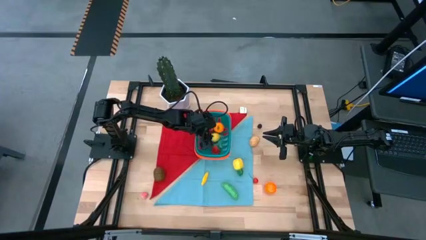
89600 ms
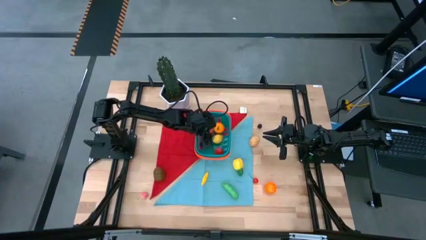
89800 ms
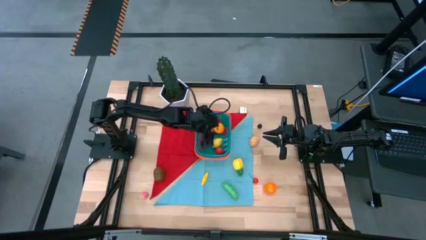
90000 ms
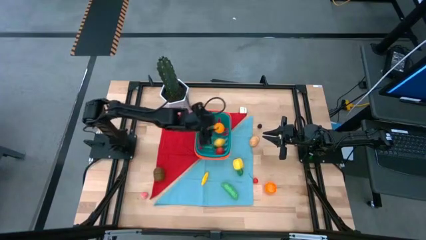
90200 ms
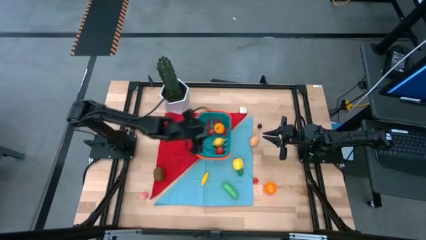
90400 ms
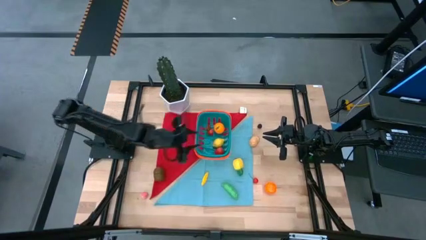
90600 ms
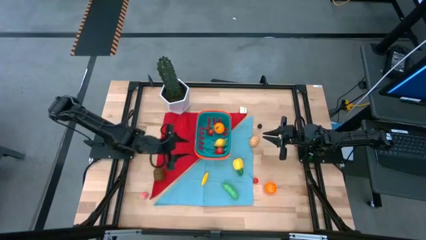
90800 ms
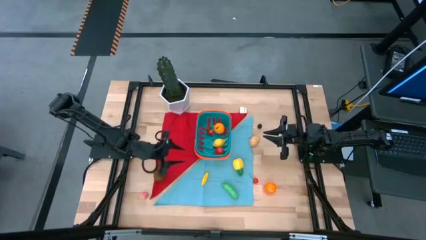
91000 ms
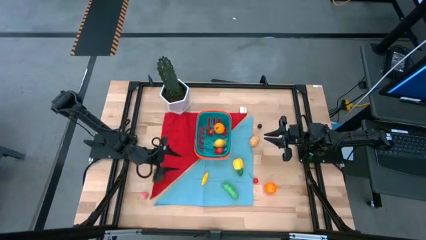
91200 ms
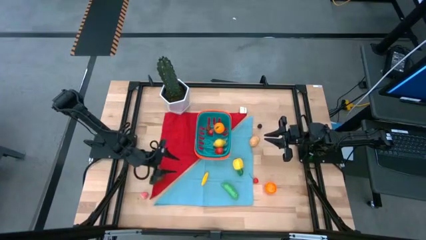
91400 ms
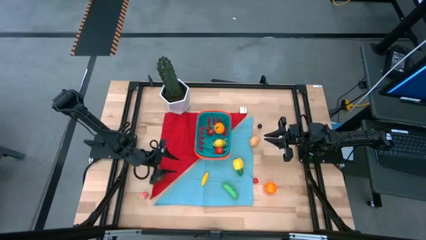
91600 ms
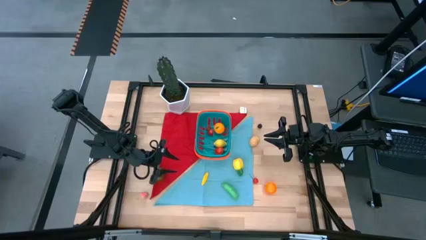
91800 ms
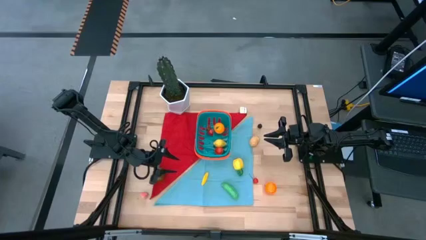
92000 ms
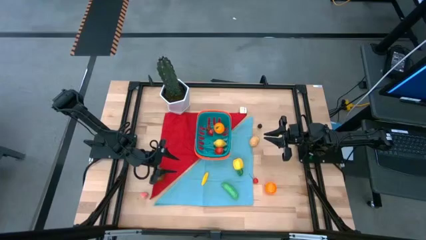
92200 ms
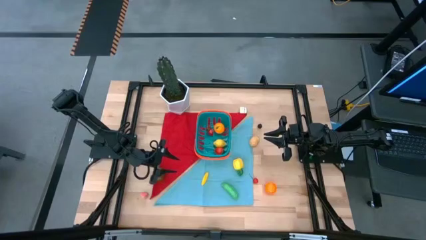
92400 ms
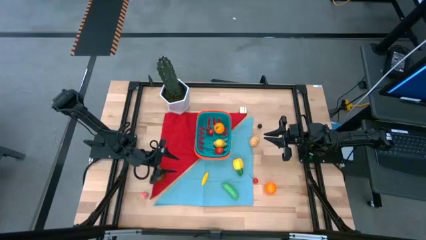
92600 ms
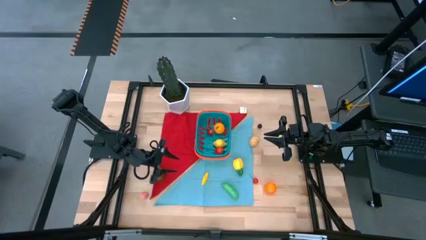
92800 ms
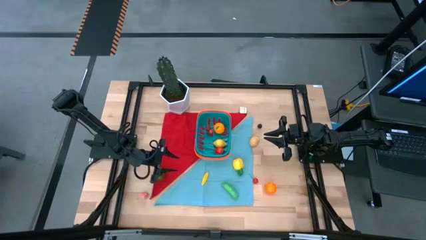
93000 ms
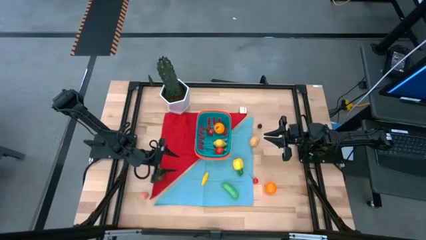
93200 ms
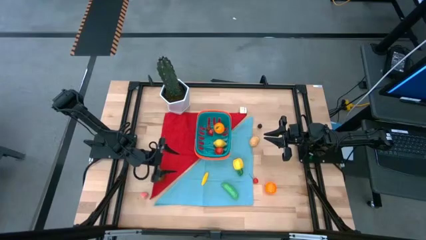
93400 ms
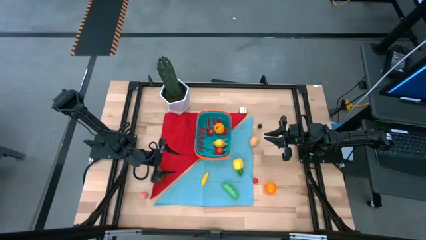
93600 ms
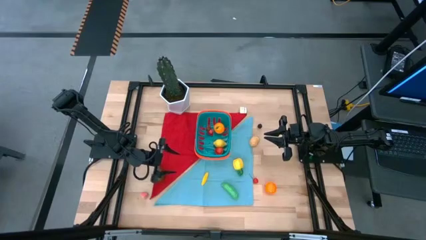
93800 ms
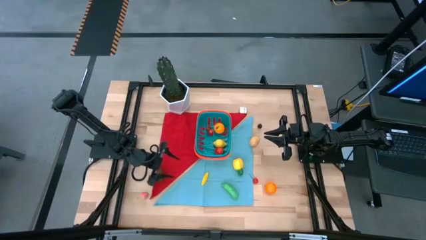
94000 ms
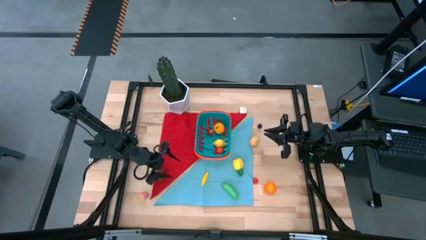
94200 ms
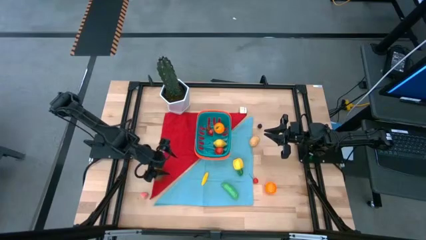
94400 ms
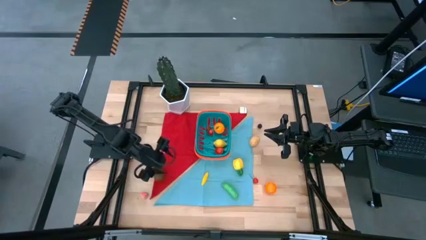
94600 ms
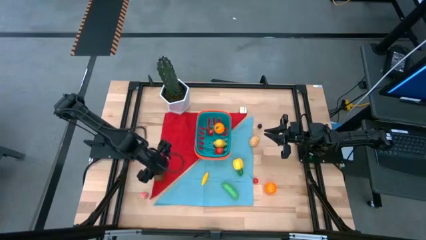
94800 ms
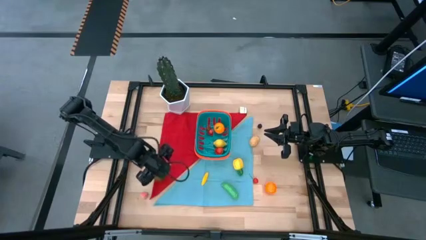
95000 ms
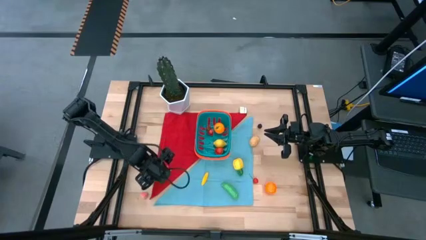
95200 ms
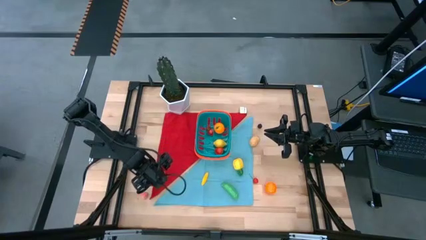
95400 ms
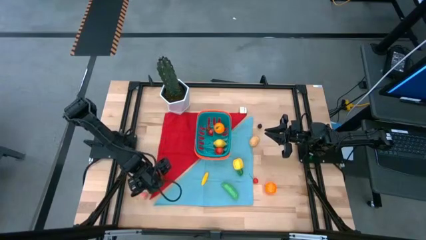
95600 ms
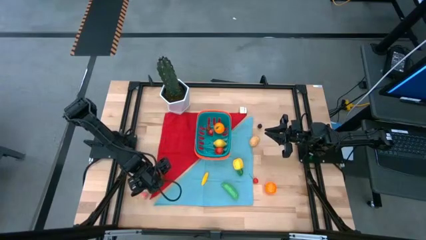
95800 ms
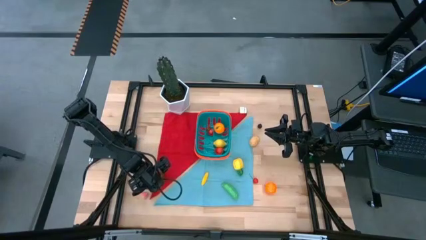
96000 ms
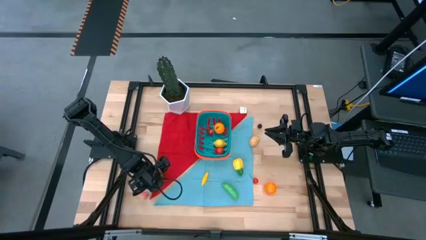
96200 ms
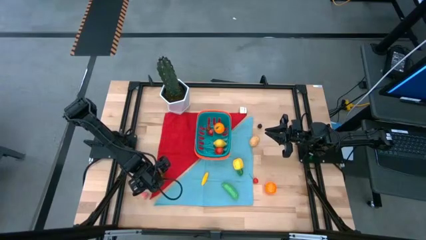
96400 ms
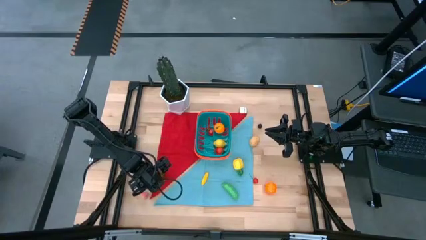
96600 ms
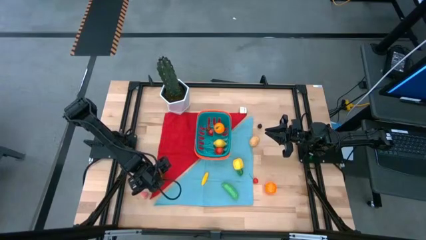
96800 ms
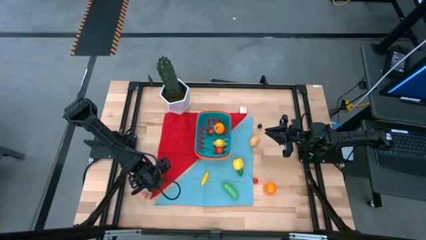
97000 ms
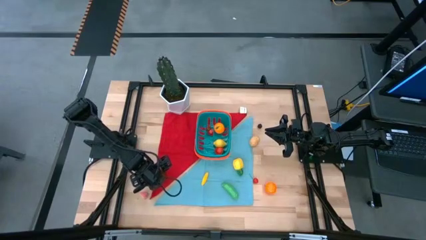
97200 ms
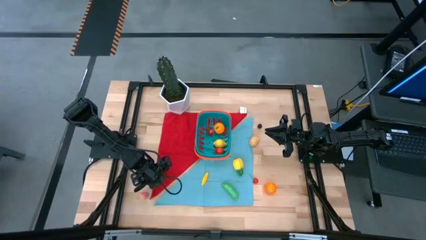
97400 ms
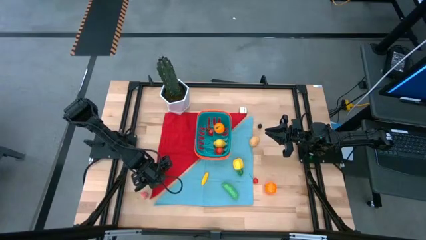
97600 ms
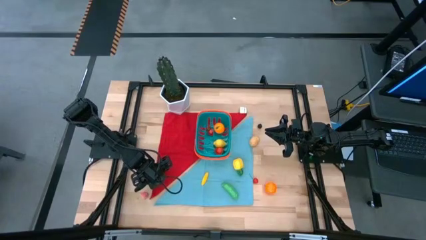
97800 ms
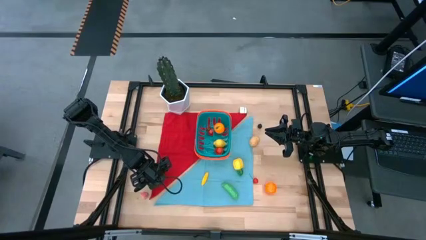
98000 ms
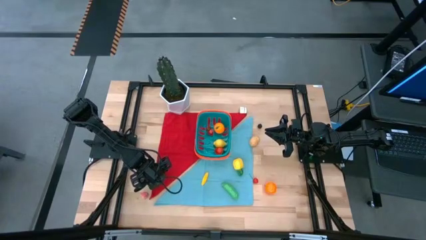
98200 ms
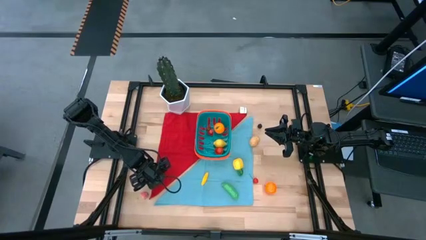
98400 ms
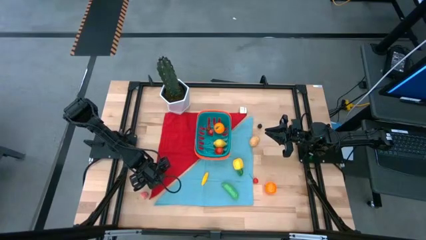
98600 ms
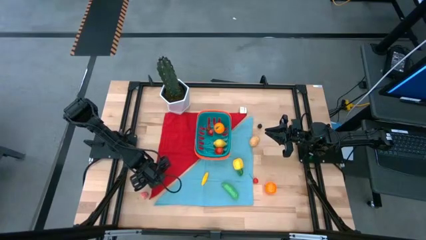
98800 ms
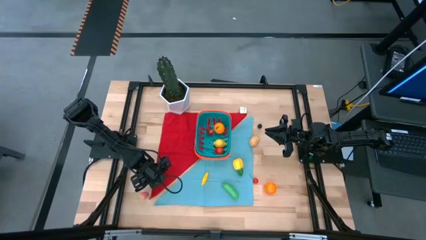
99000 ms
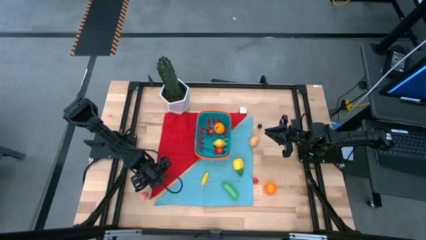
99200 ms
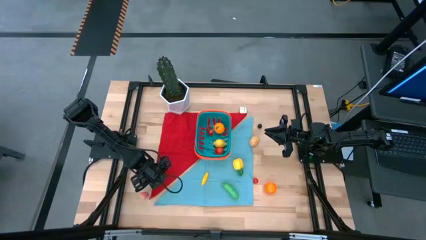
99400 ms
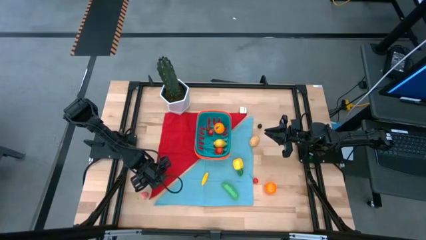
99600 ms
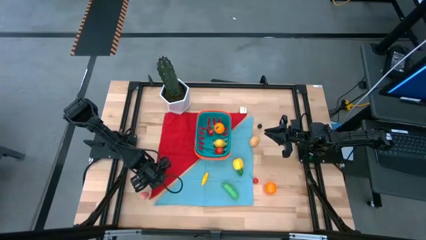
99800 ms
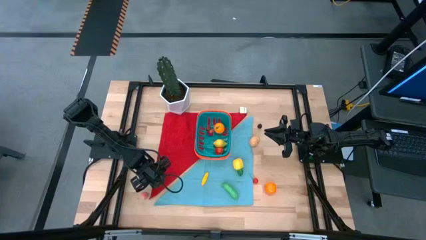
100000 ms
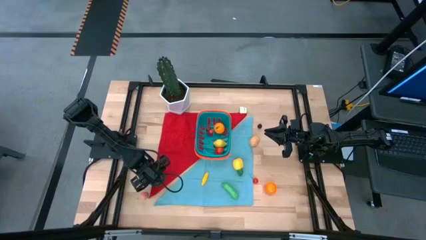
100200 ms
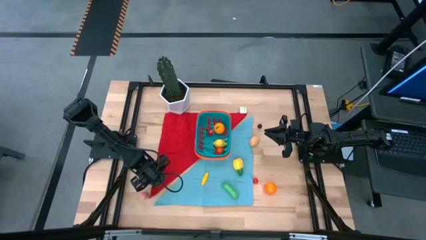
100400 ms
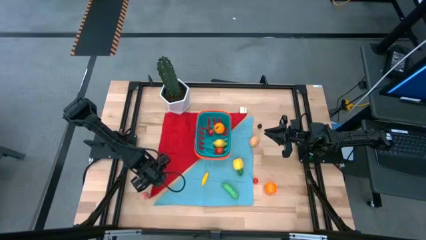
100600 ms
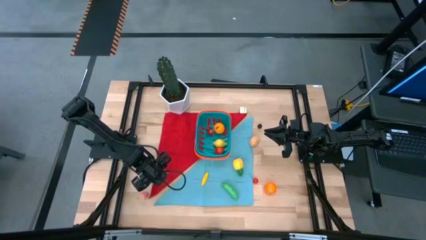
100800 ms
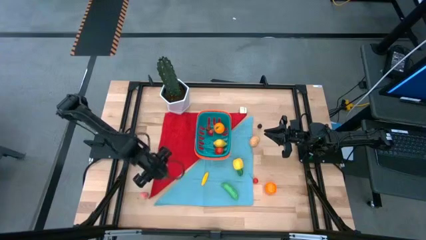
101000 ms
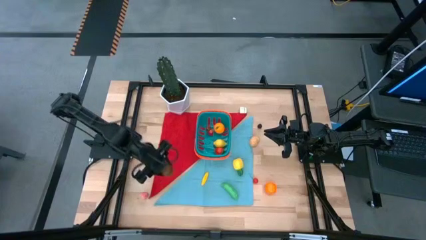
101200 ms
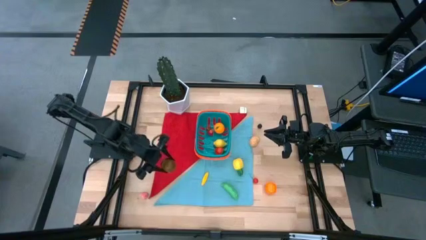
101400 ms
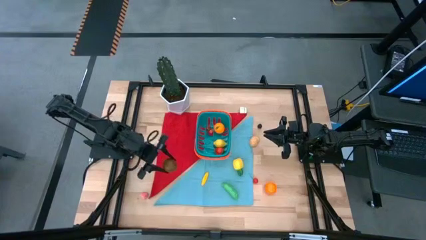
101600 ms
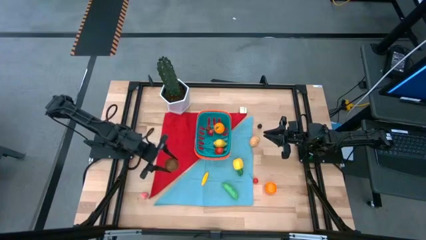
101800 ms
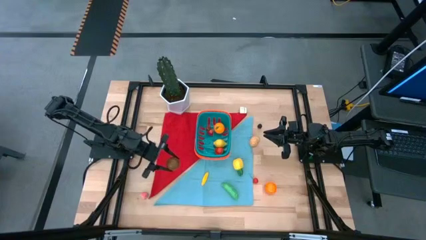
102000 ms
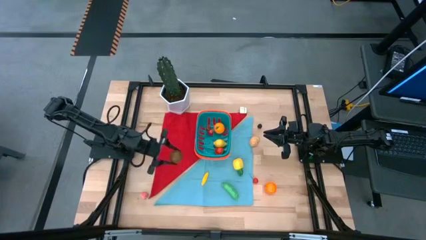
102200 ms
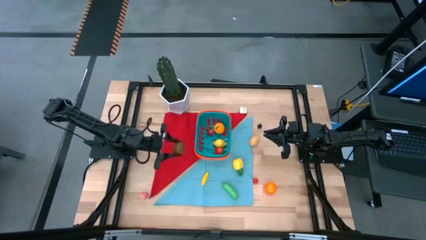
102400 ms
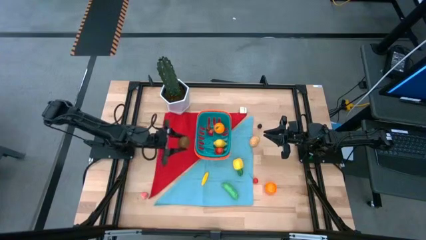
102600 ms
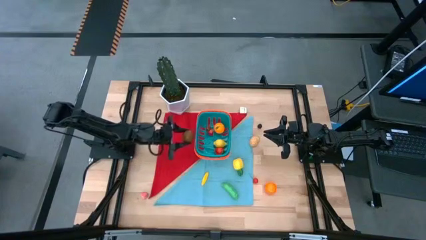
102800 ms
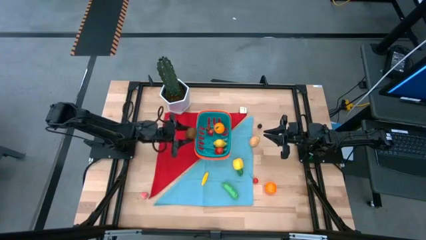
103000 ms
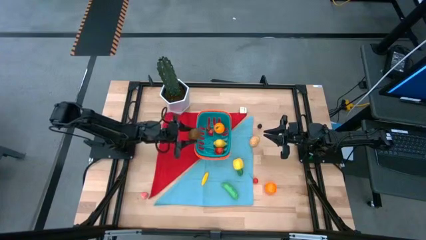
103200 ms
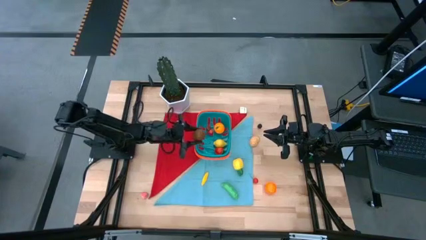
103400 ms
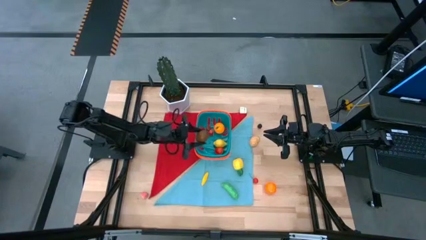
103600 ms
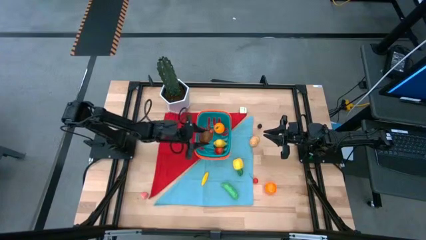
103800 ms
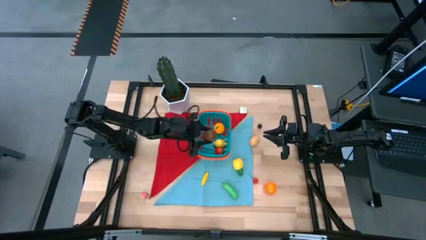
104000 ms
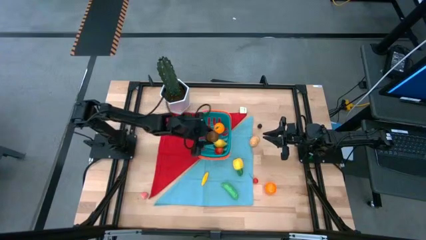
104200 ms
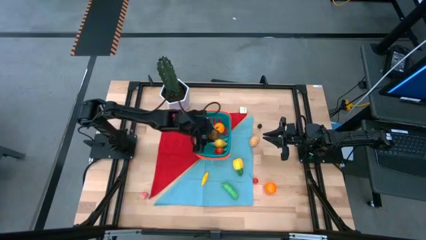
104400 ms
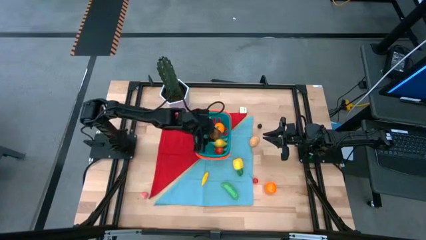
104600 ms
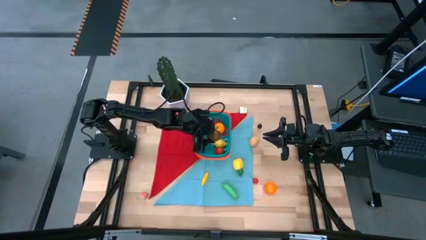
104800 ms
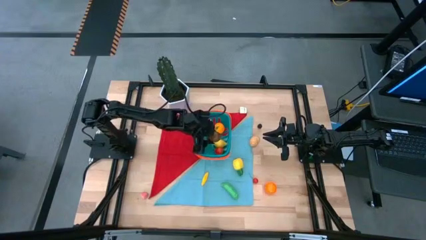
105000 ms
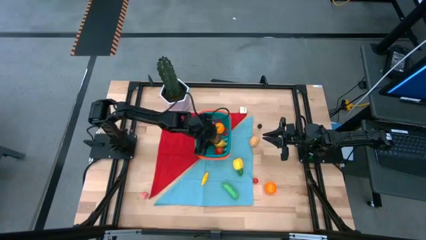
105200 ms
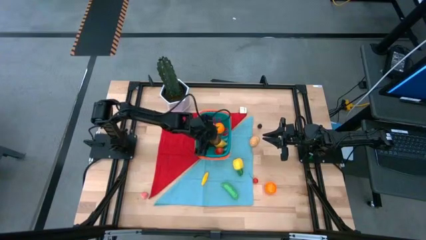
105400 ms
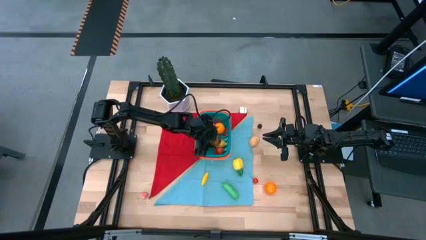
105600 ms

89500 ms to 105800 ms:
Task: Pick and placing Produce into tupperware
Put the kiwi into the basket
